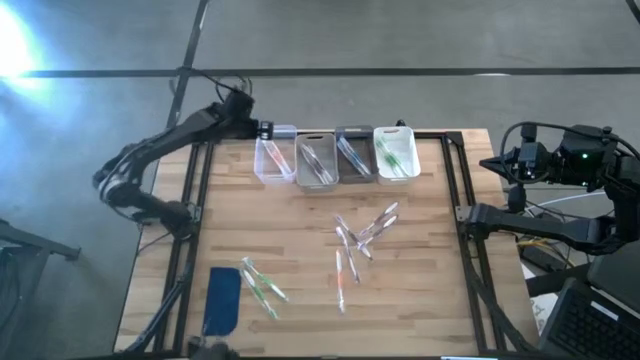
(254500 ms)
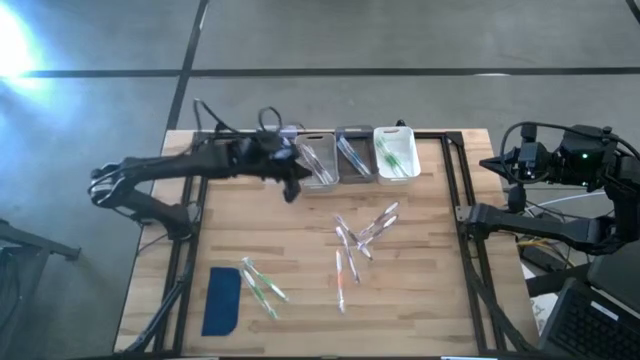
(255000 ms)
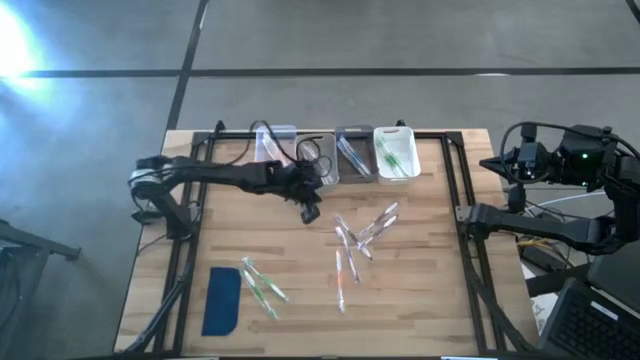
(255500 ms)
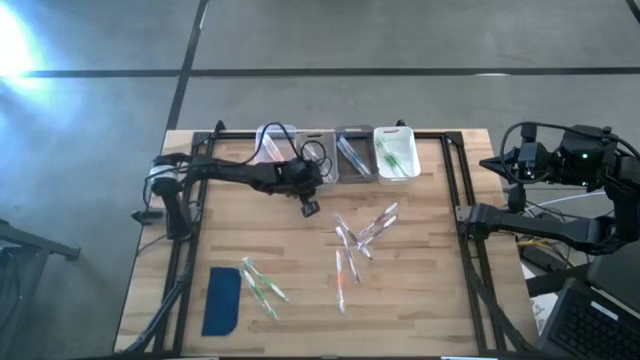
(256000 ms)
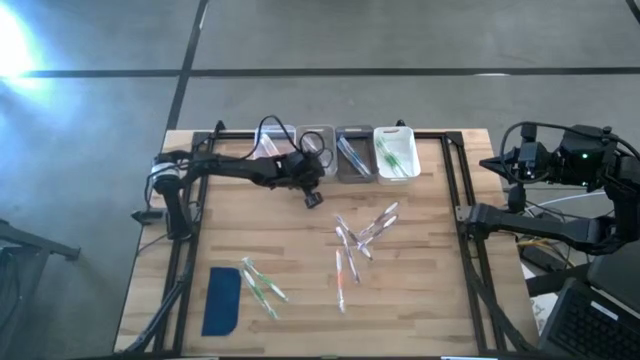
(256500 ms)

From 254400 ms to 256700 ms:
Task: Pick & Place Toothbrushes
Adjust the gray bin

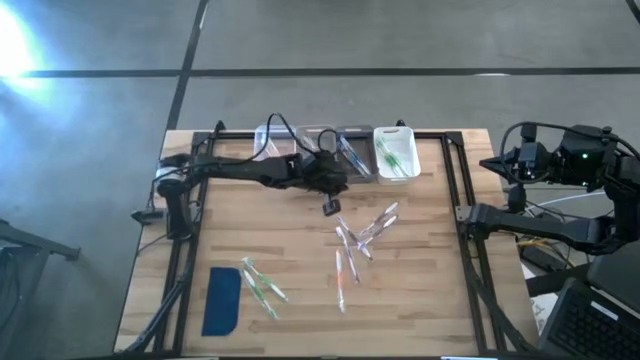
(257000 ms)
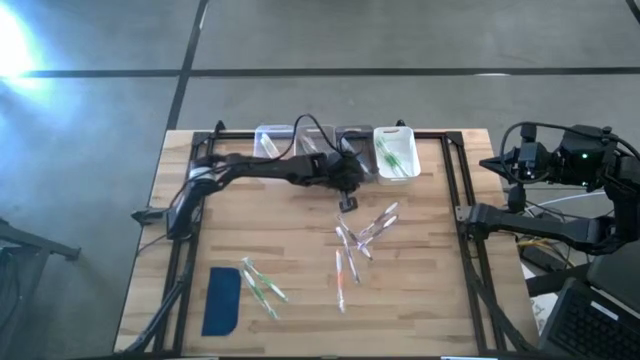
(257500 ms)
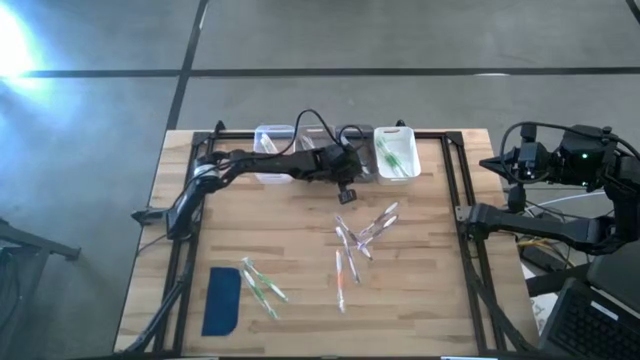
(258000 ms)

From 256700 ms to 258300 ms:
Adjust the black transparent bin

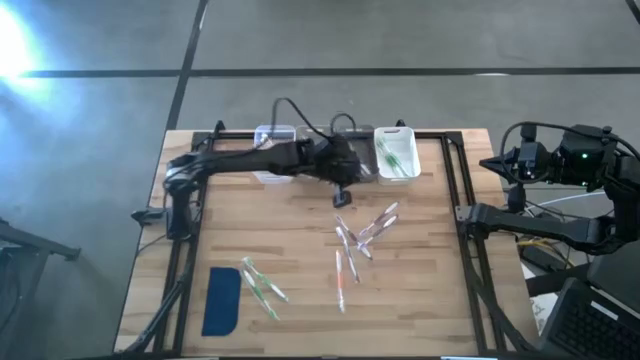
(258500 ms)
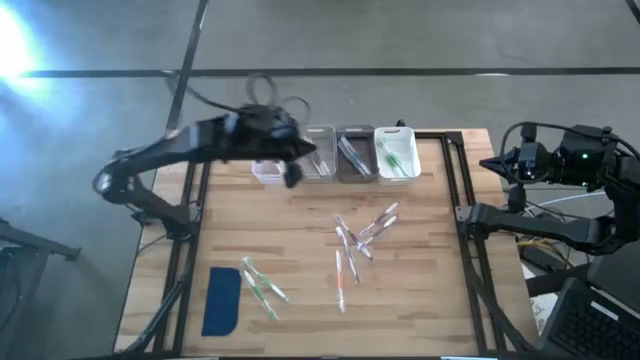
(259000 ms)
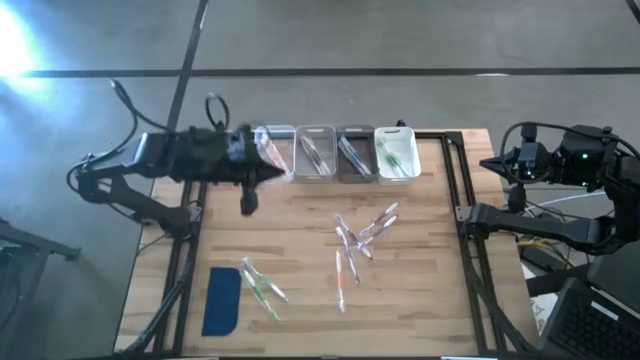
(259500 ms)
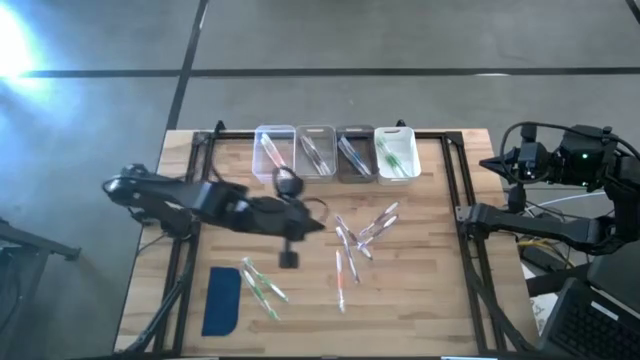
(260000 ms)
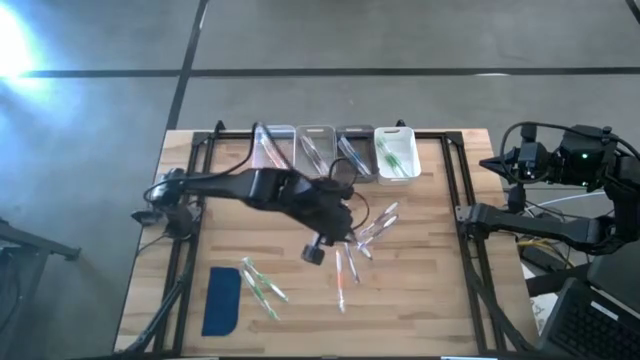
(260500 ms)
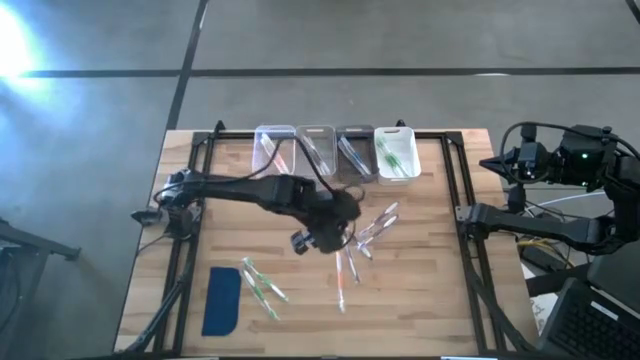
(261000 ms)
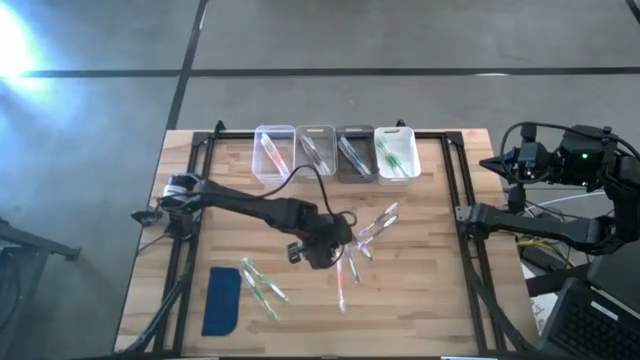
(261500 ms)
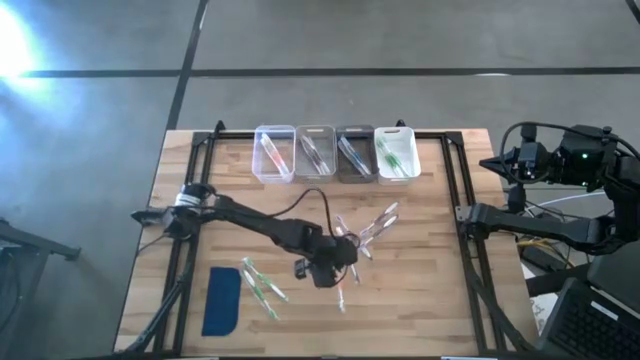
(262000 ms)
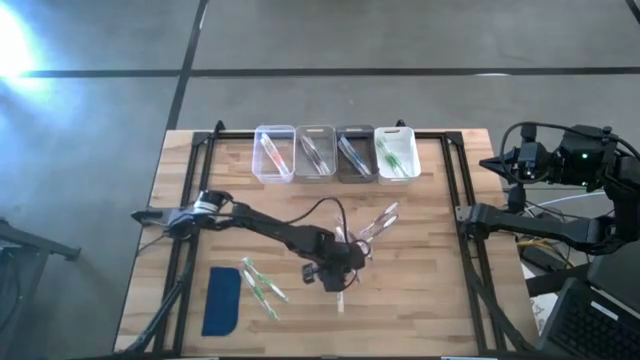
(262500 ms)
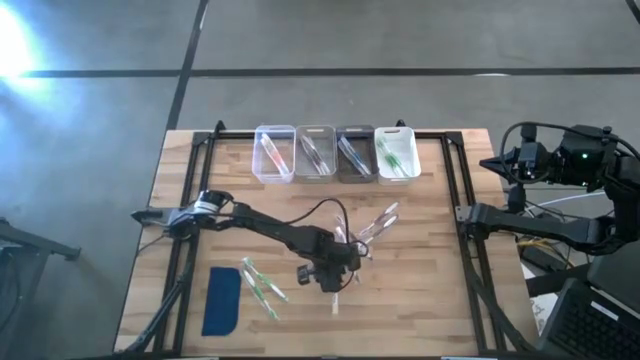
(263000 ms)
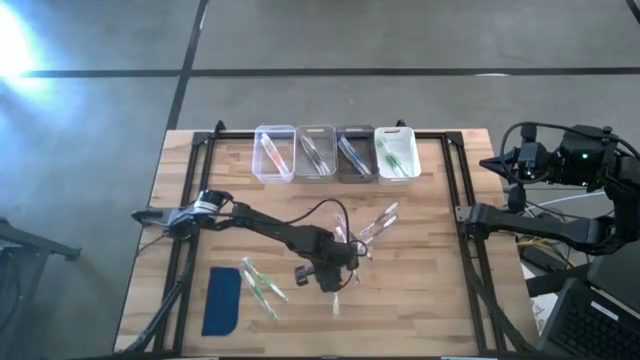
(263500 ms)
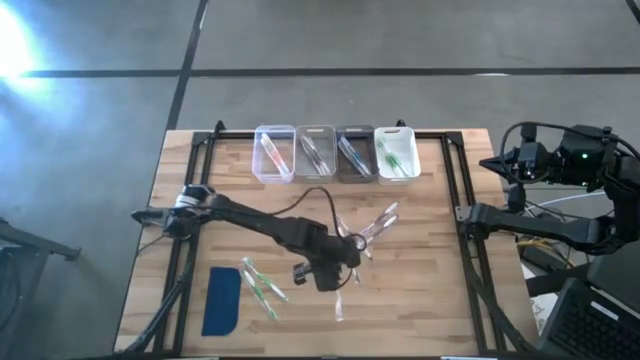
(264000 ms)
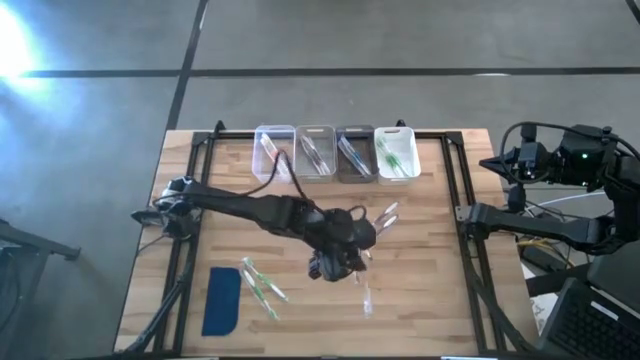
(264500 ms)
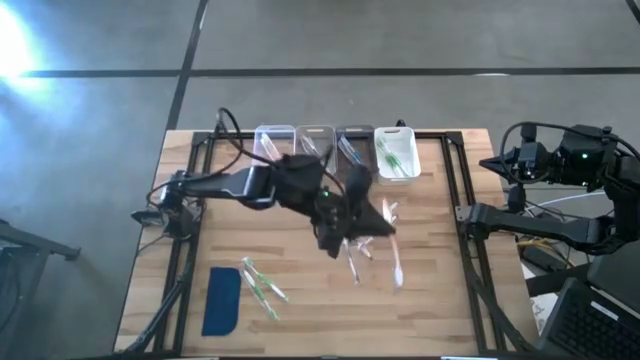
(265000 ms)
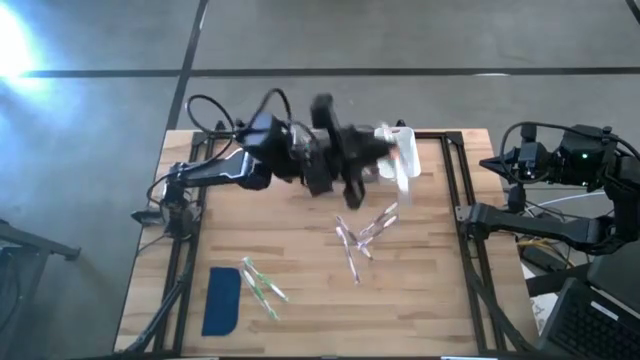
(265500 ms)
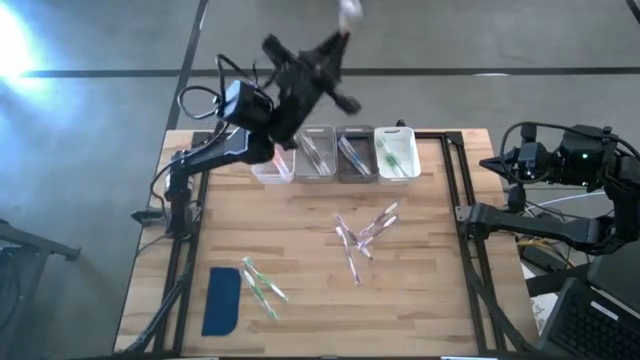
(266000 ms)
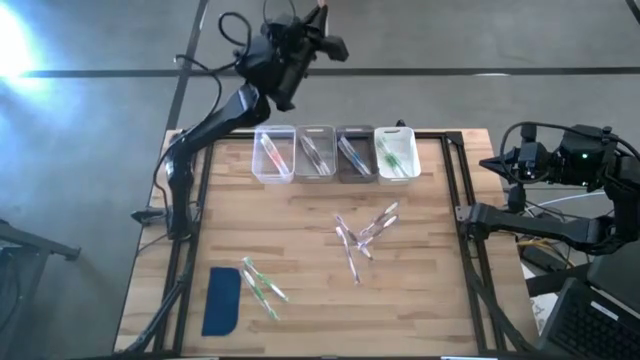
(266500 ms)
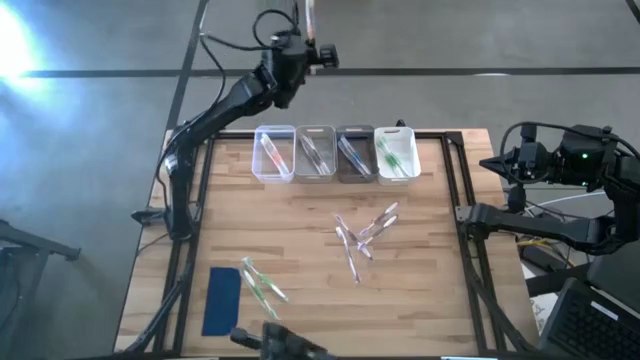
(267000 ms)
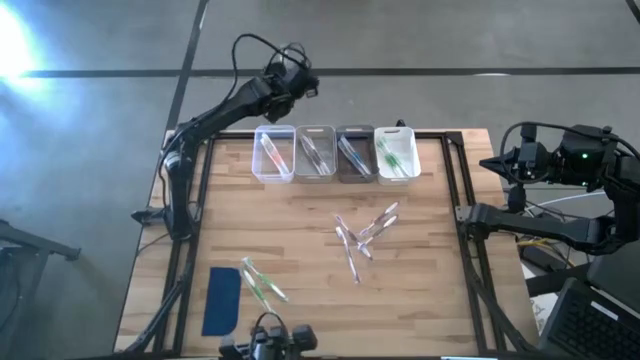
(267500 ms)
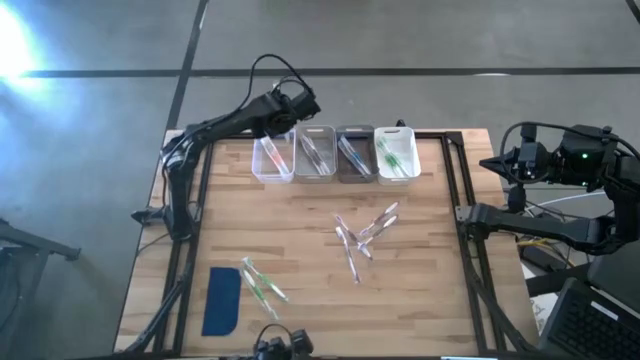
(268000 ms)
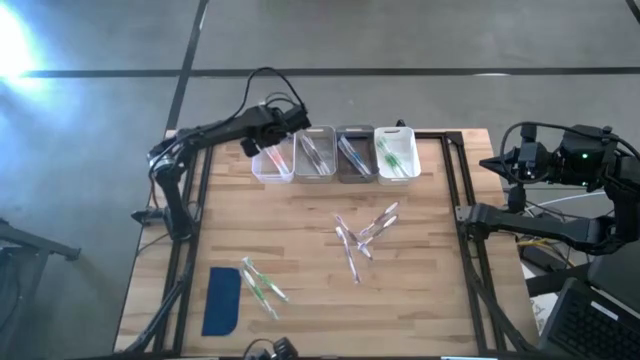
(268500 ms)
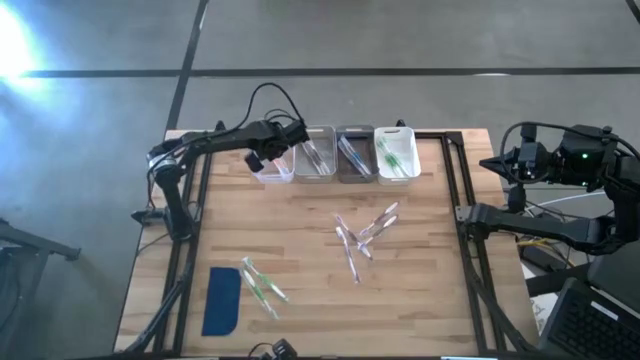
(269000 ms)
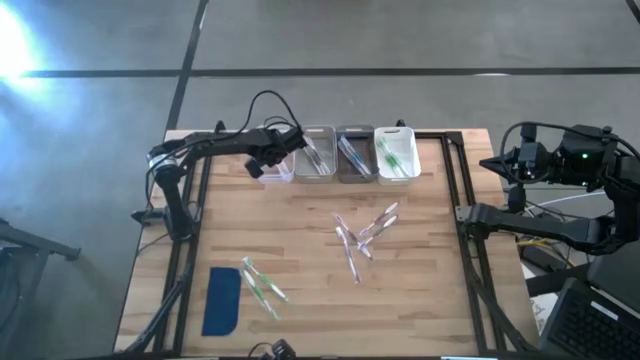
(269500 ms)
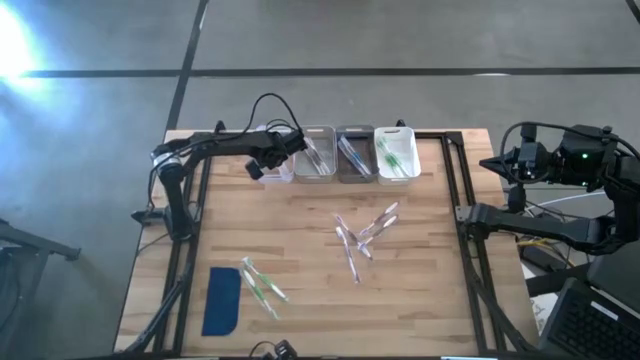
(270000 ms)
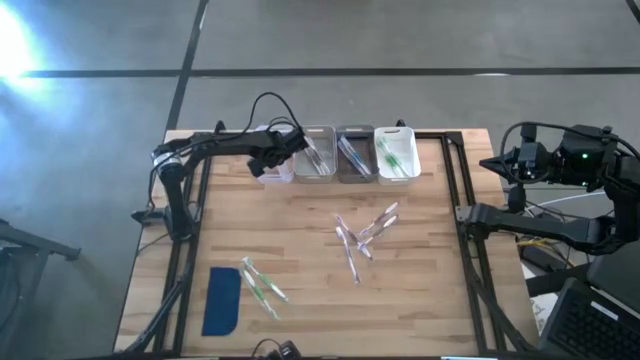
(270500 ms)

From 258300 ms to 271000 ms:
Put the orange toothbrush into the white transparent bin

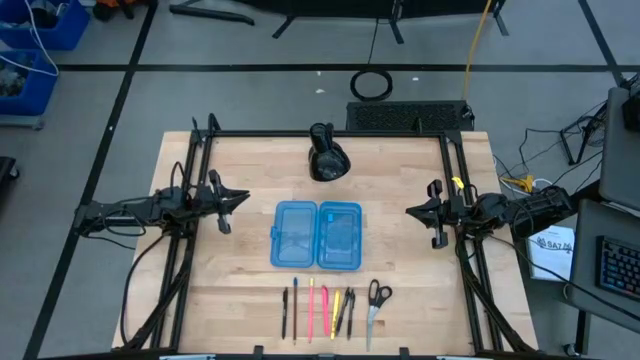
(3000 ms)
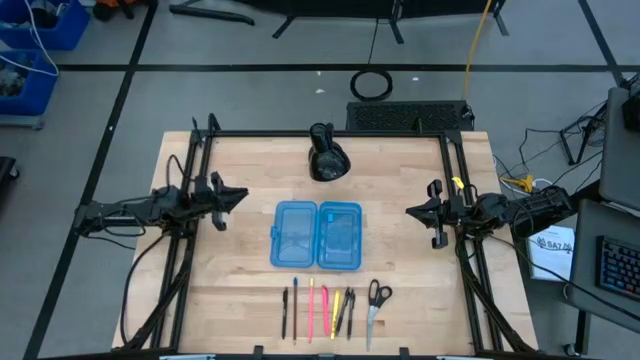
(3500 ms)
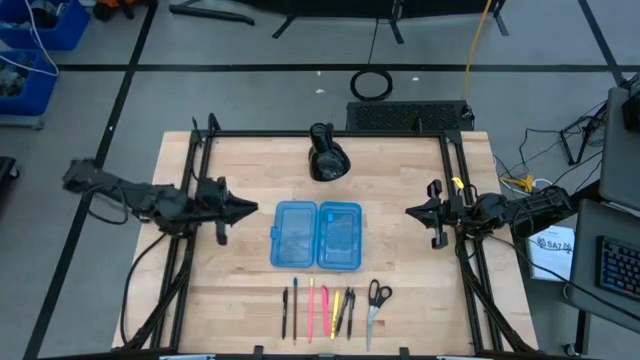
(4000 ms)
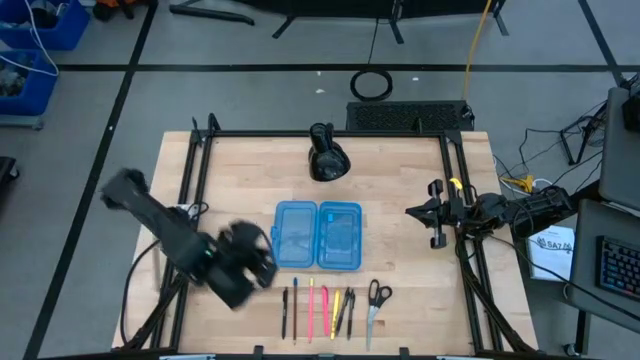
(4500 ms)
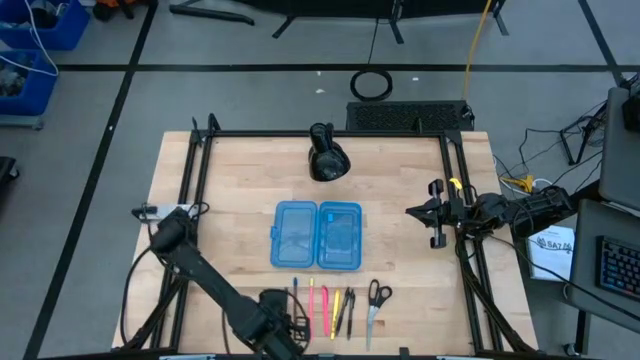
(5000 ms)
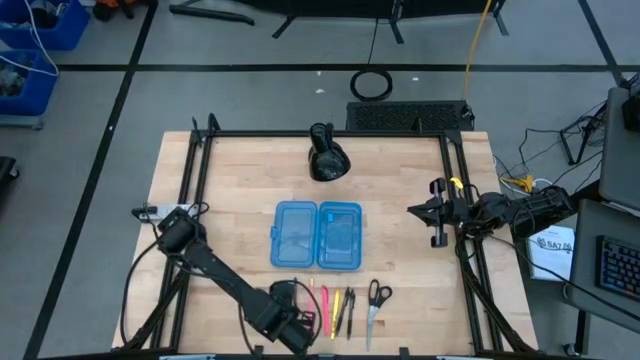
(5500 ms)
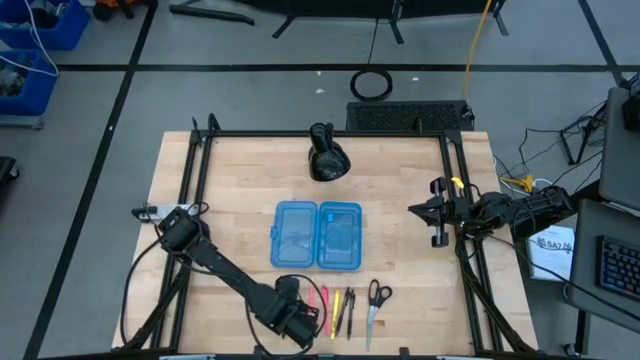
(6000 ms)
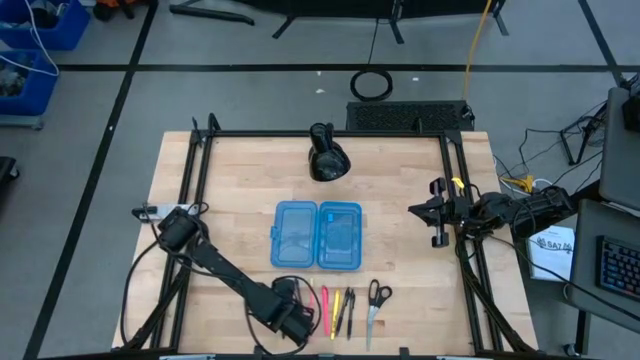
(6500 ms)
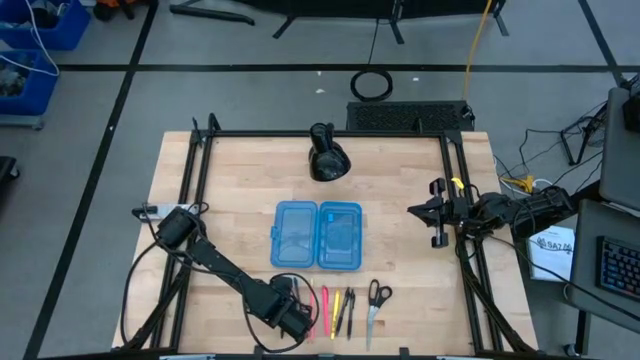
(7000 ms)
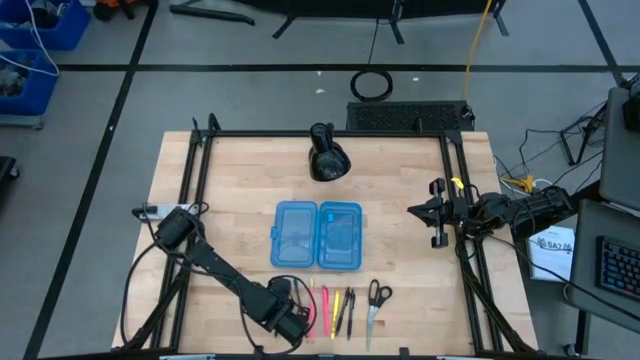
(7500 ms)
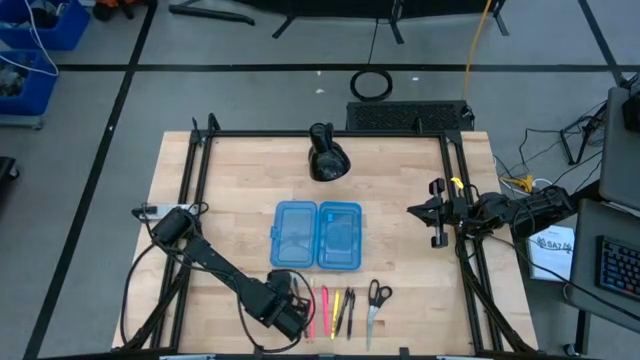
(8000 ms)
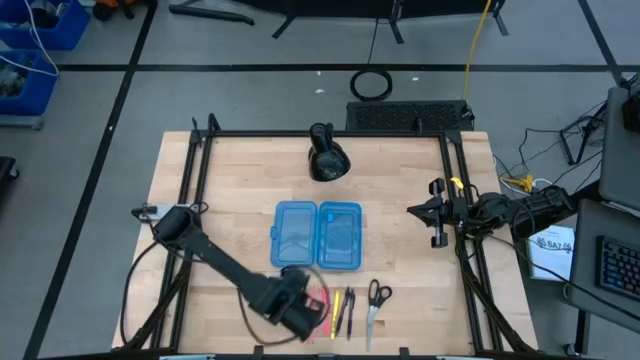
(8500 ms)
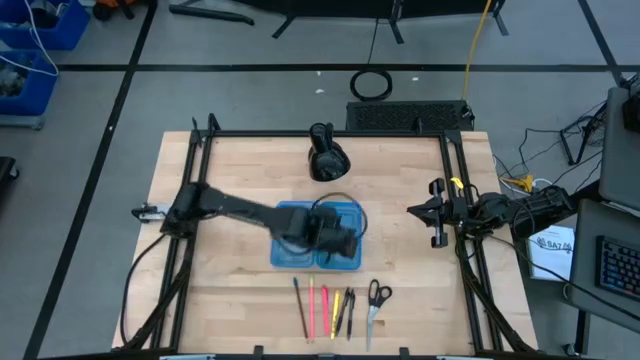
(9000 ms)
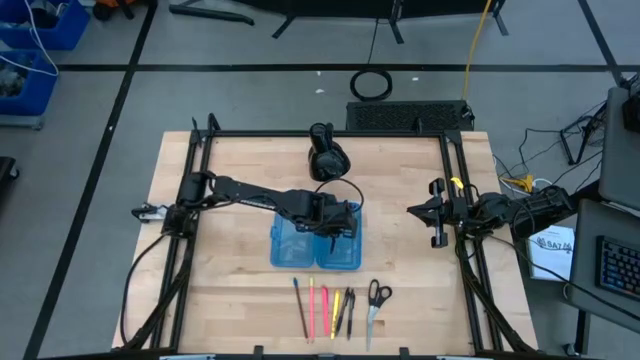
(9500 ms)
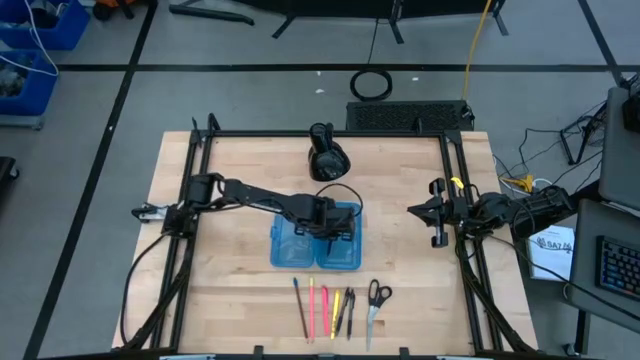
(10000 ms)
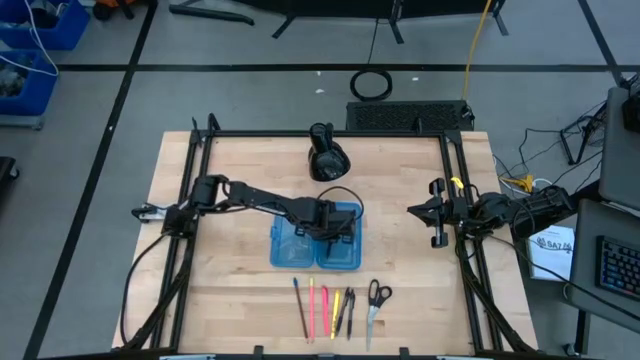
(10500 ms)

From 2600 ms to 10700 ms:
Task: Pick & place school supplies into a supply box
Put the left black pen into the blue supply box
